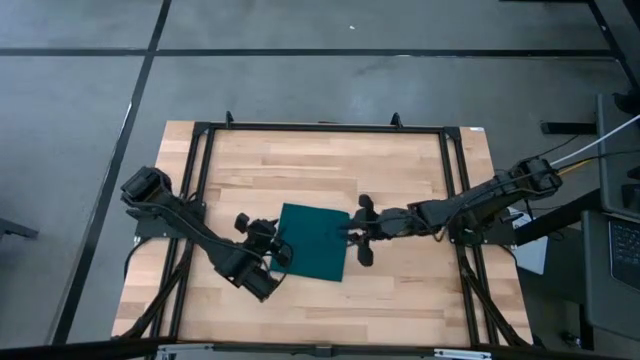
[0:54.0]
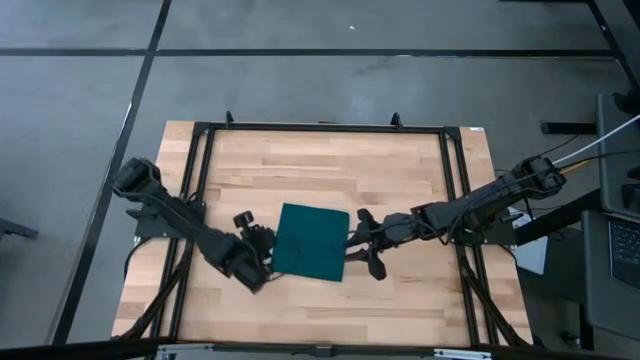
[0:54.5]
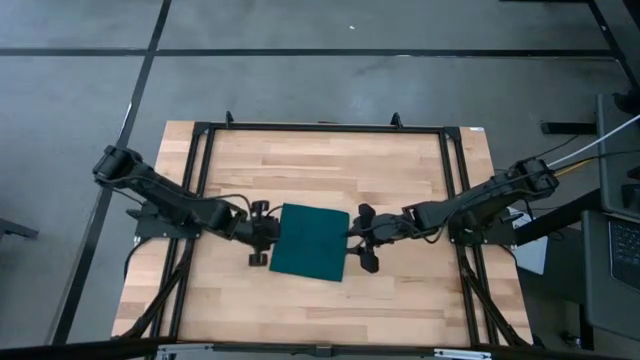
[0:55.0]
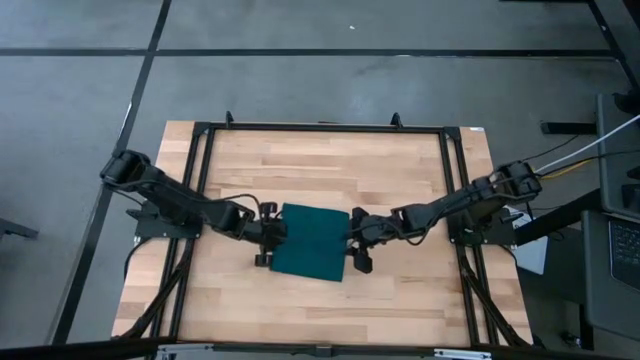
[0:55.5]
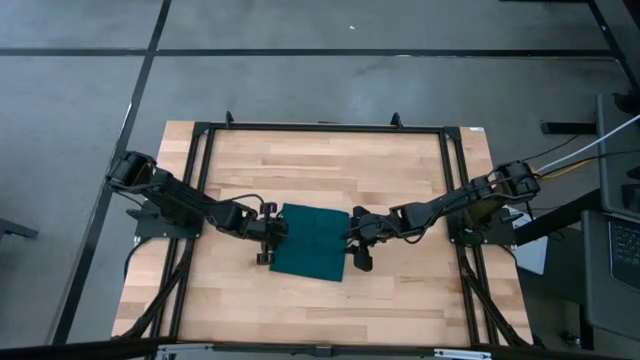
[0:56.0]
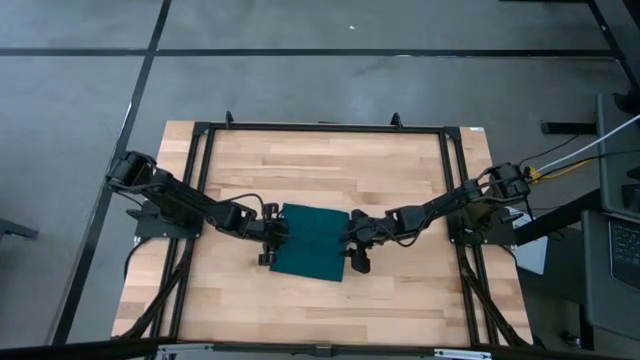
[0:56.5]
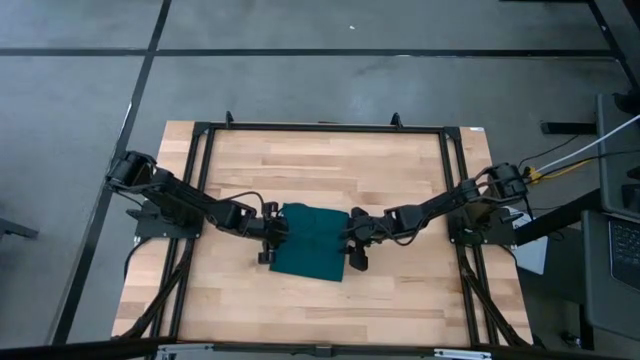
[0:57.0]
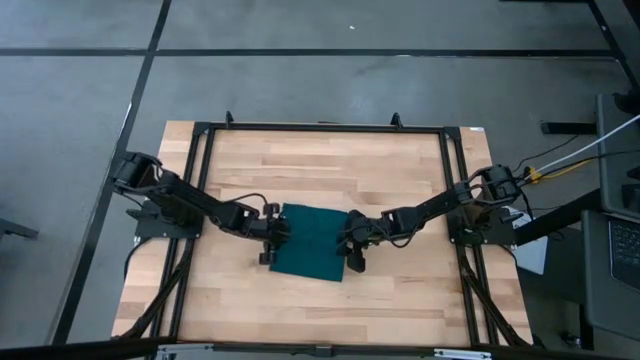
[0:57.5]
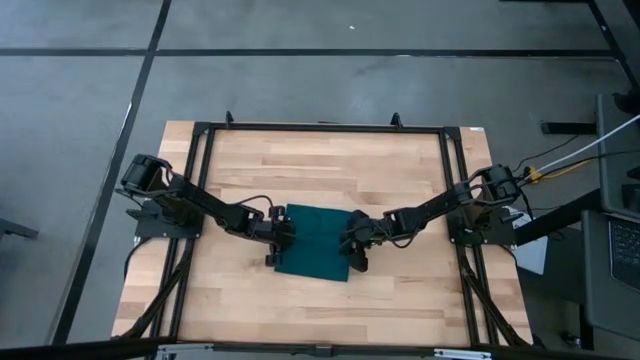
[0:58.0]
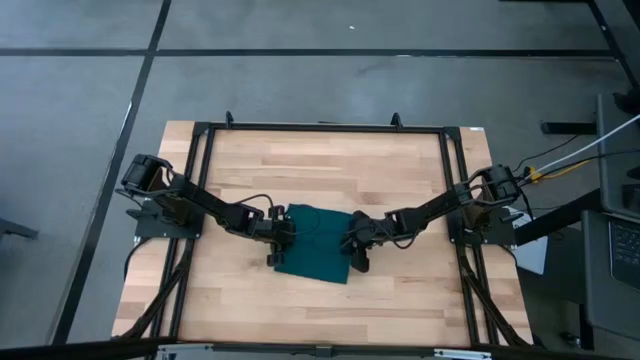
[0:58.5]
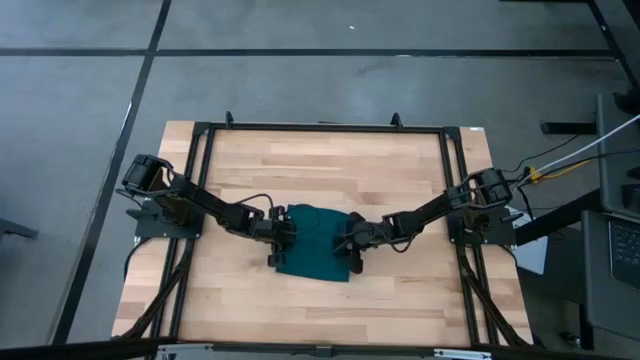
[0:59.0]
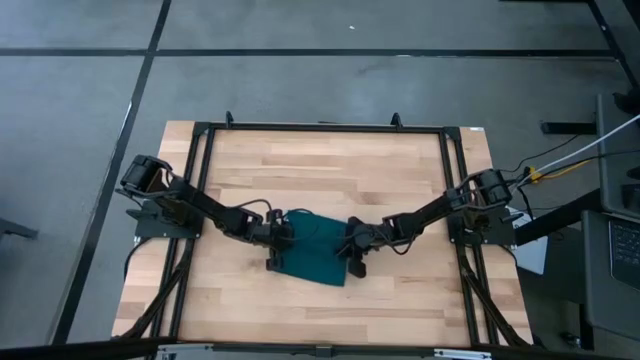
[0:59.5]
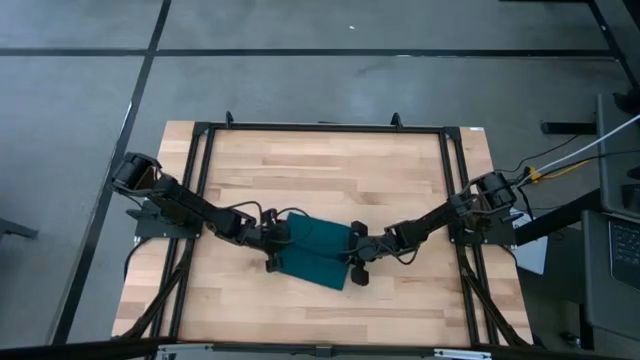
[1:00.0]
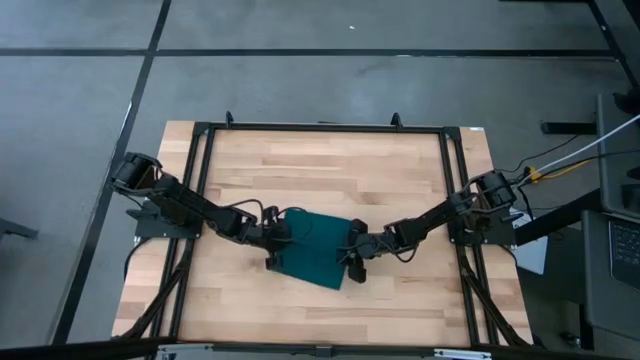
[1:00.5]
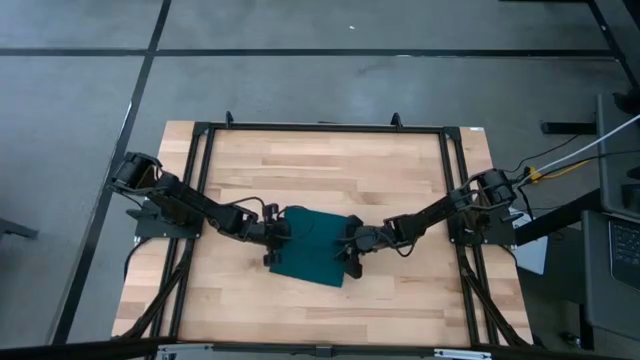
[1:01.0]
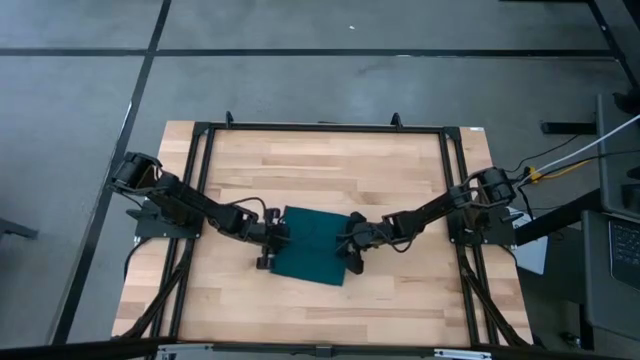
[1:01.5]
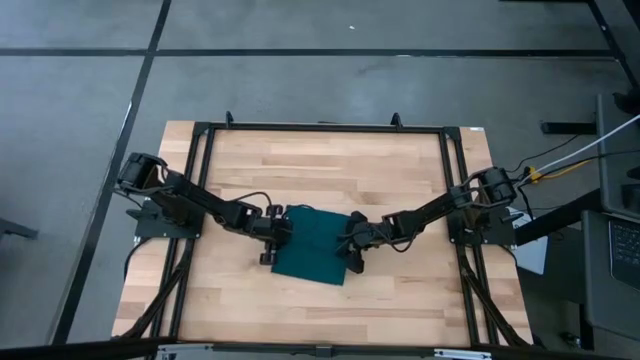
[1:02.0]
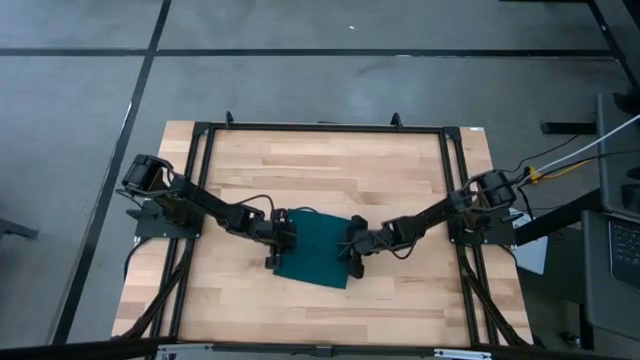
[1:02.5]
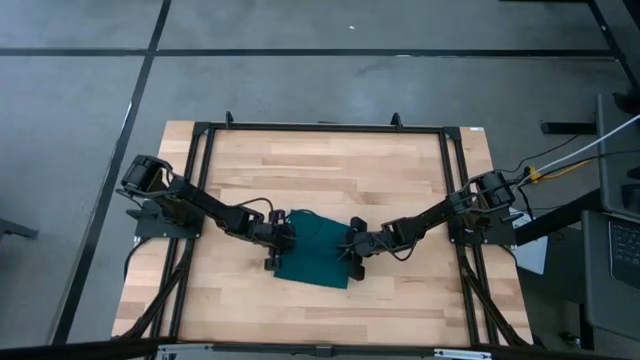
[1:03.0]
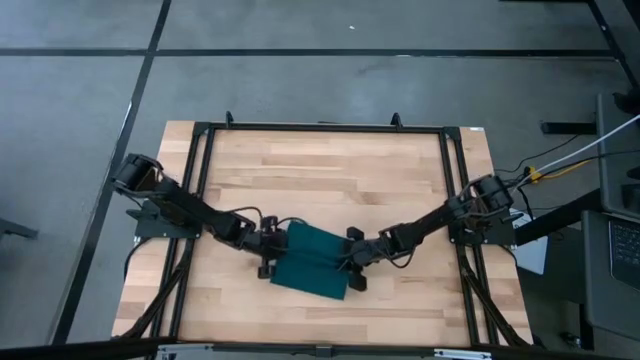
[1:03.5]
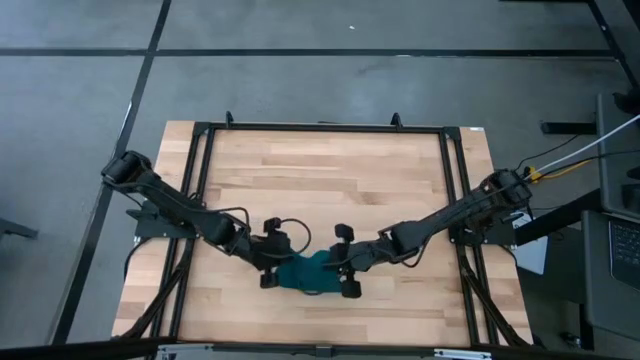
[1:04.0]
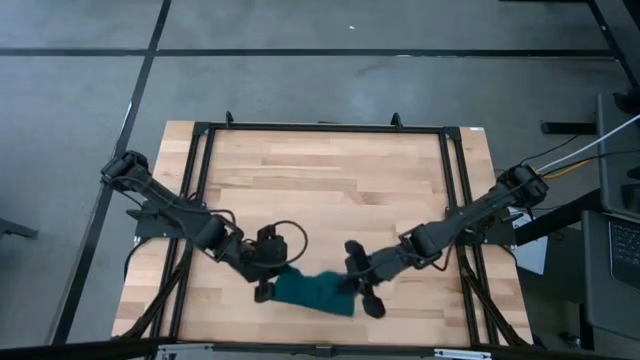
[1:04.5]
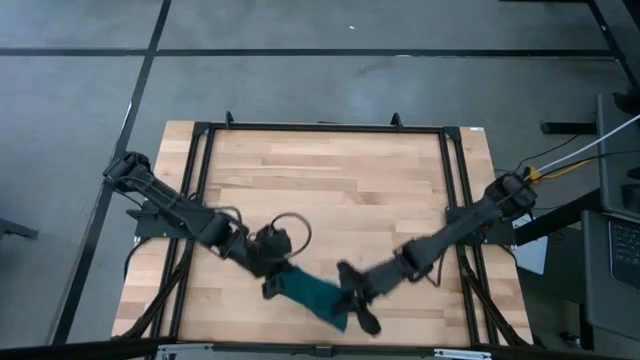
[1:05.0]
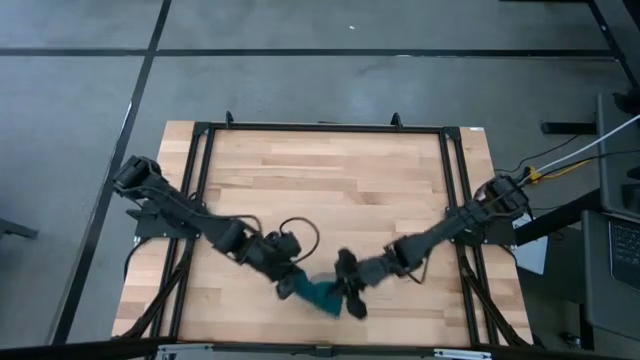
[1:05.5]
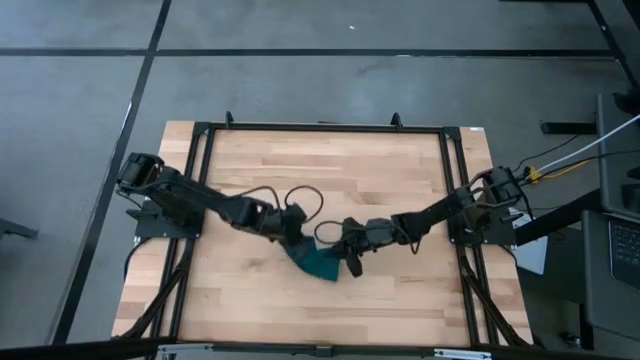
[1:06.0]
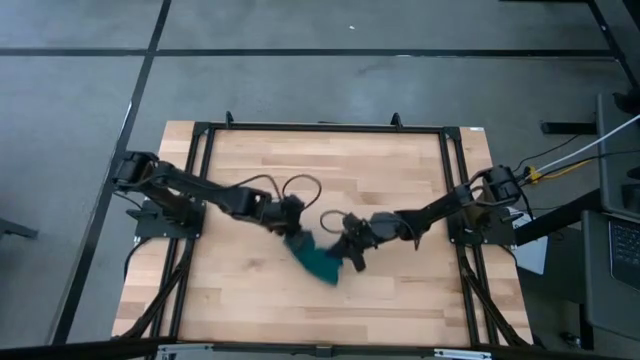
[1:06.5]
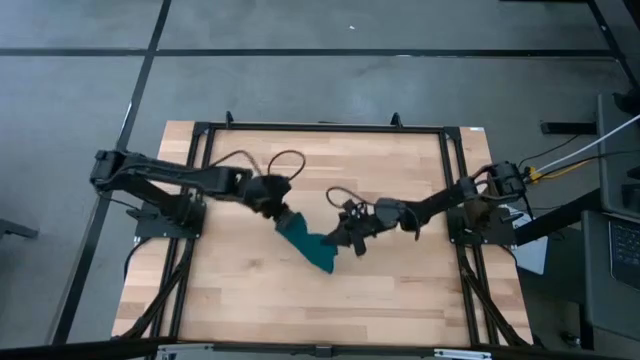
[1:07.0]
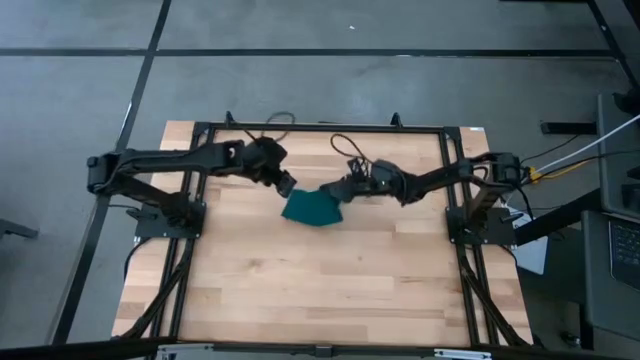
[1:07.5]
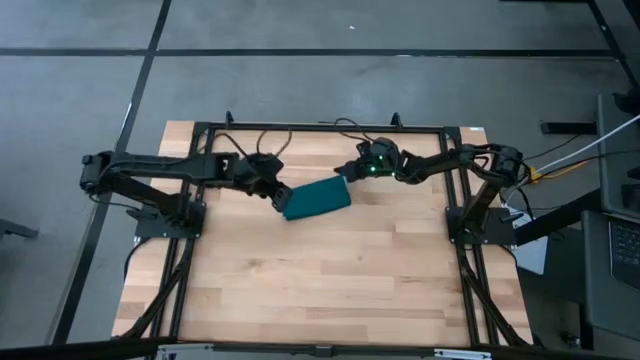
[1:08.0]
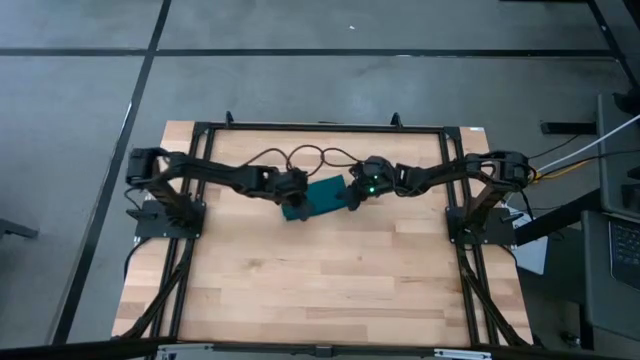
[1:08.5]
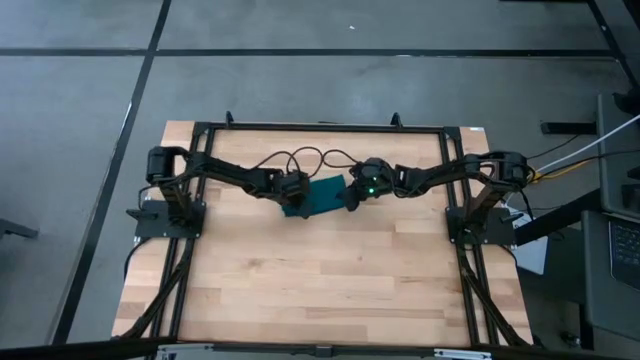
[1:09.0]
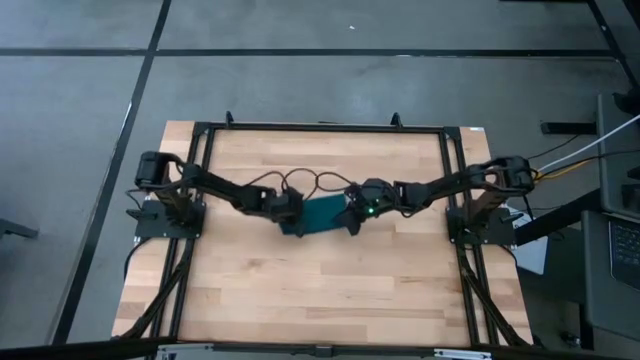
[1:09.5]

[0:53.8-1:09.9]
Task: Fold microfiber towels
Fold the green towel

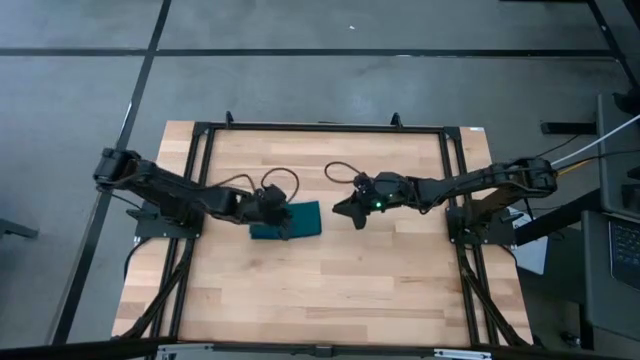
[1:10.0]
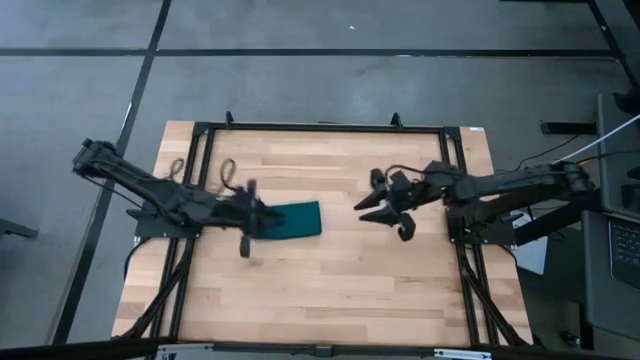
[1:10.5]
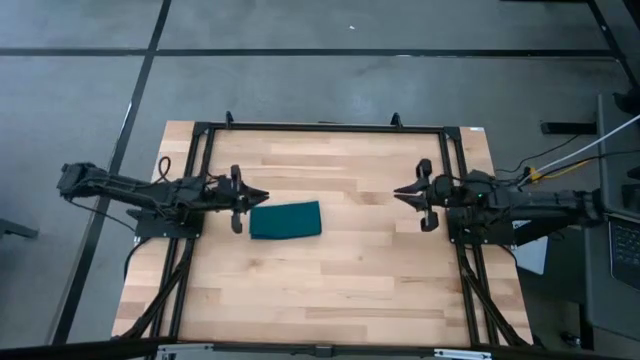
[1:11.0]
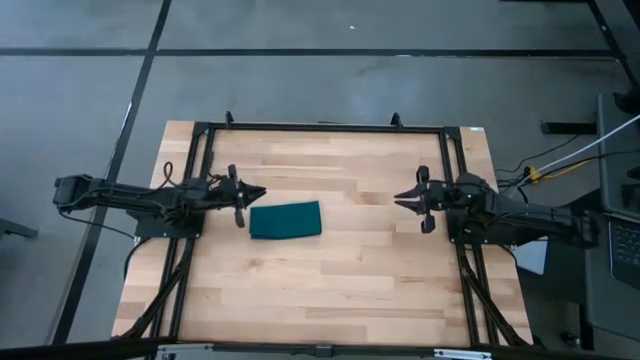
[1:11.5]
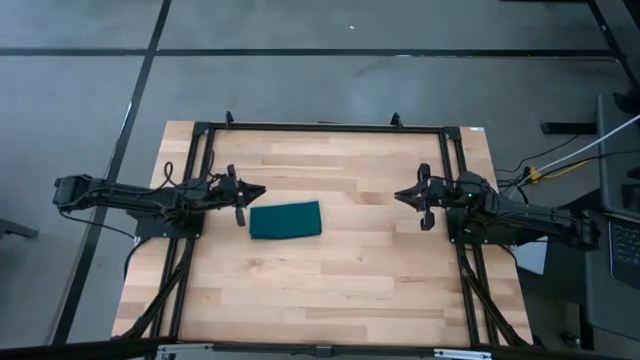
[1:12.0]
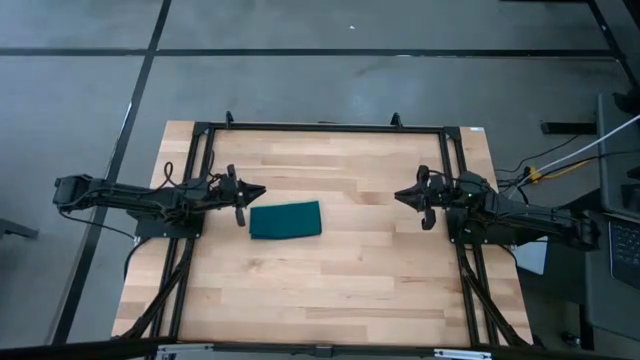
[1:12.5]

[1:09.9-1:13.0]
Return To Home Position

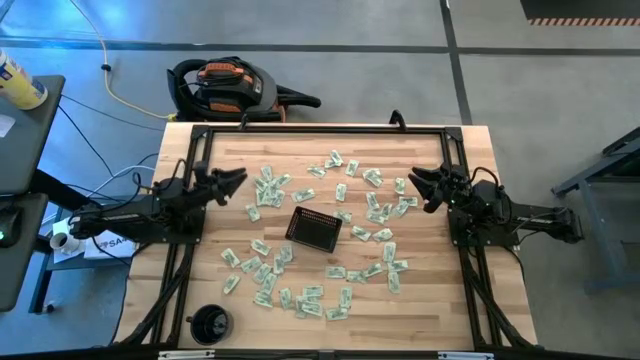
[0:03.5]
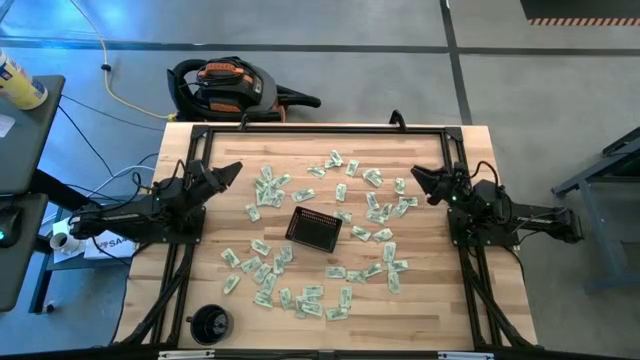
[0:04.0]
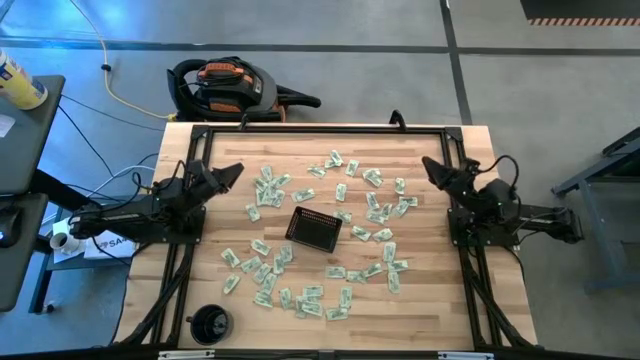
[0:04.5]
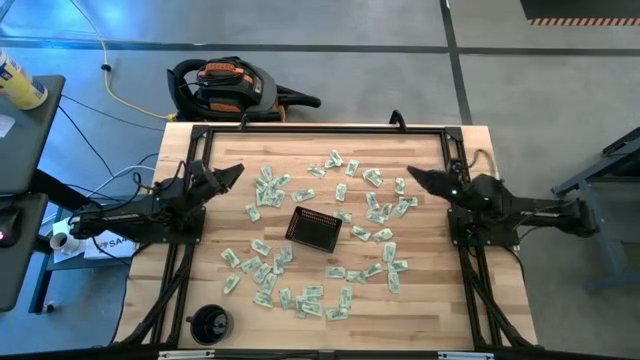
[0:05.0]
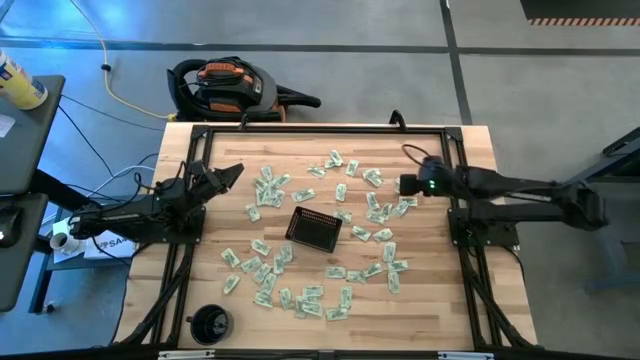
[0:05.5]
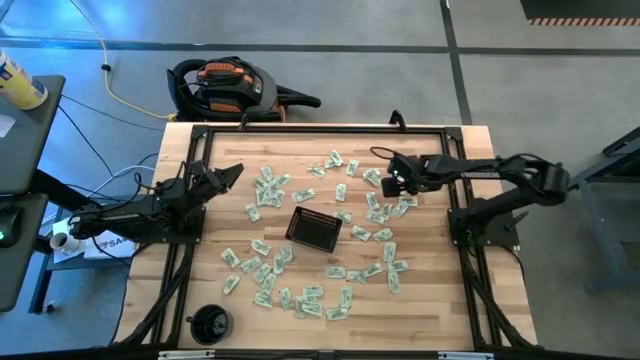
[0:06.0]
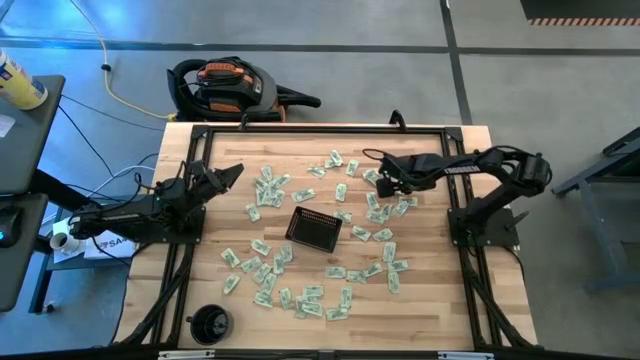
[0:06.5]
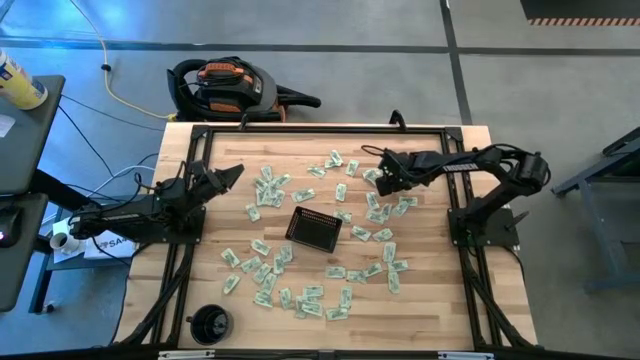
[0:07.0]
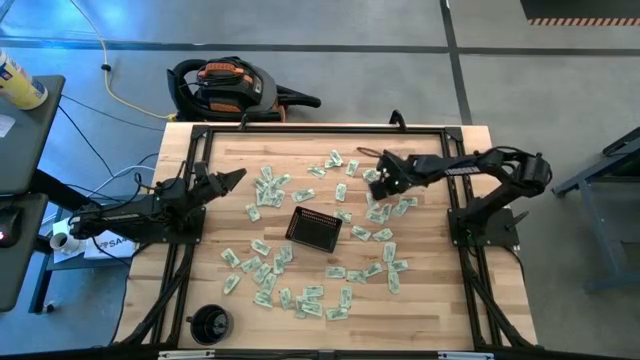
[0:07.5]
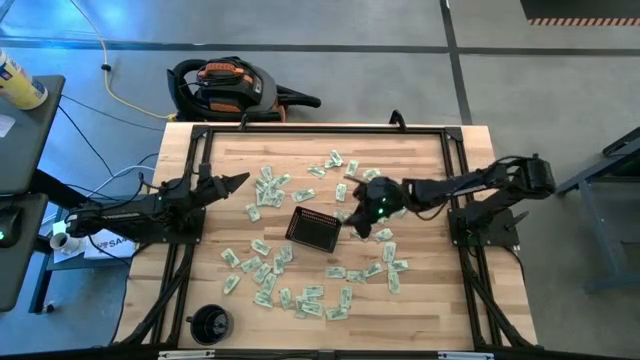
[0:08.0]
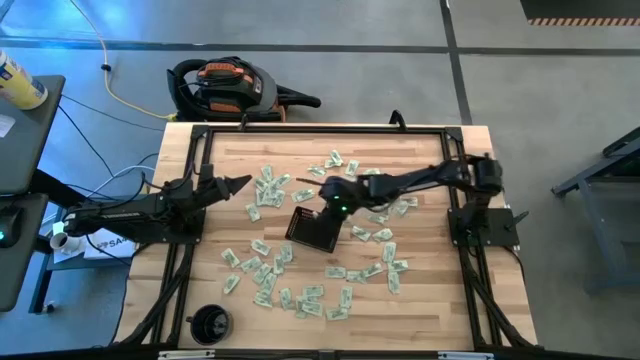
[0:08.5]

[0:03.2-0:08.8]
Task: Pick and place Stevia / Truvia into bins
Put the green stevia packet into the black basket
